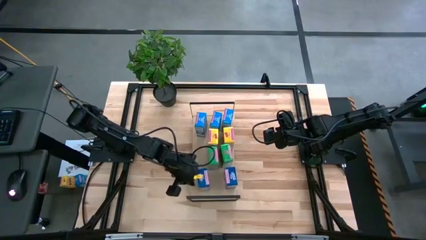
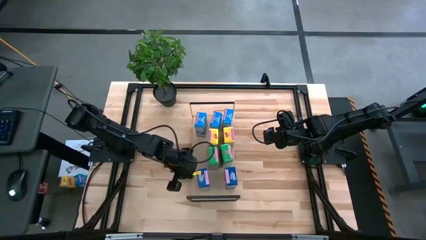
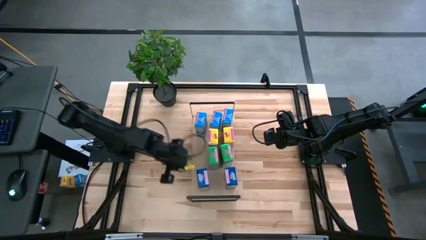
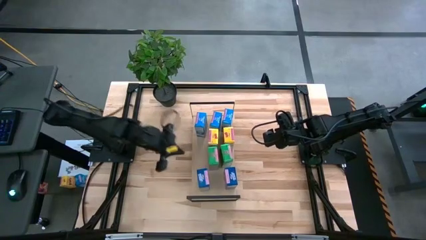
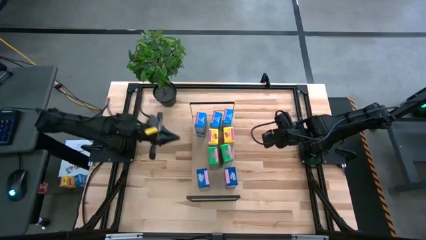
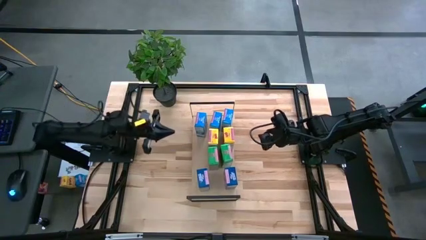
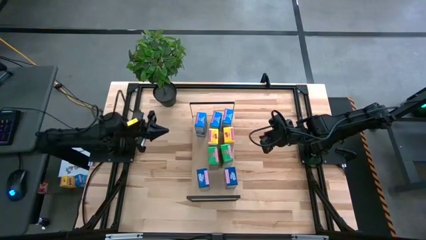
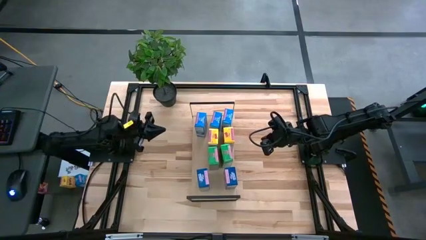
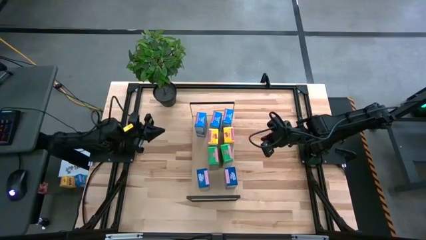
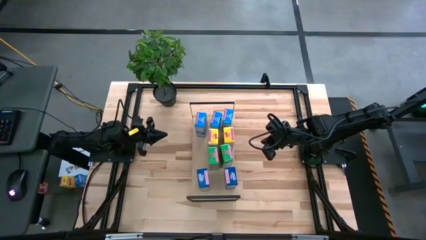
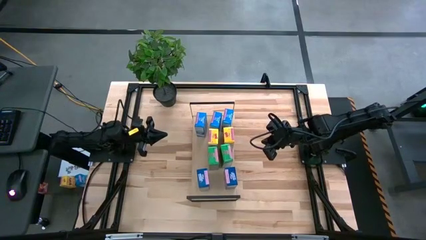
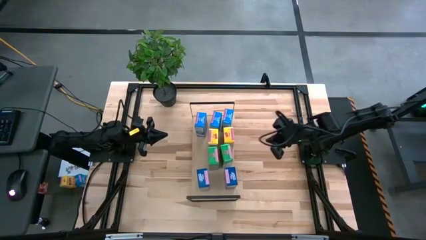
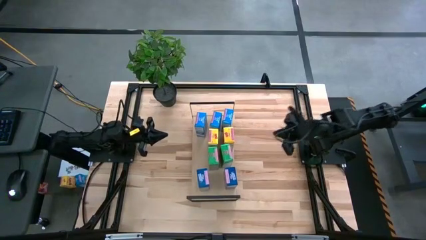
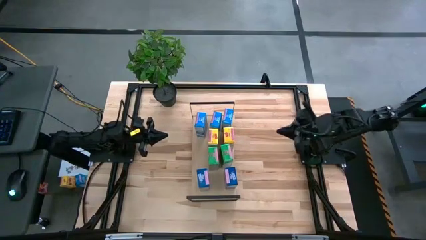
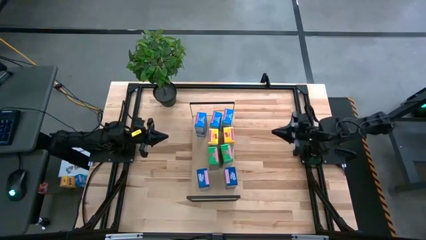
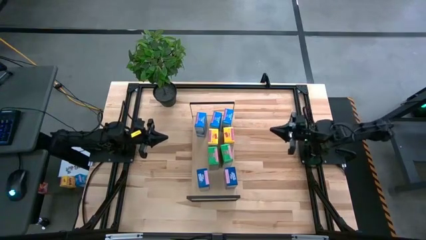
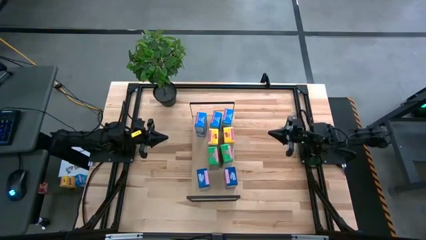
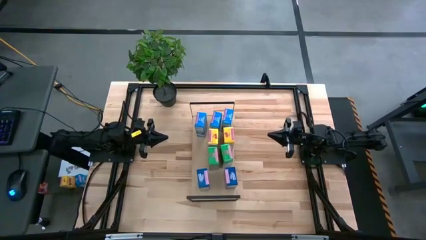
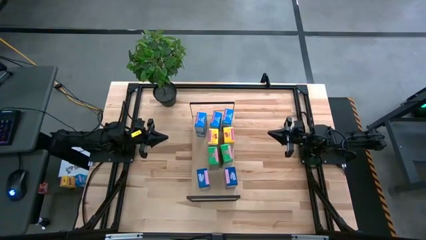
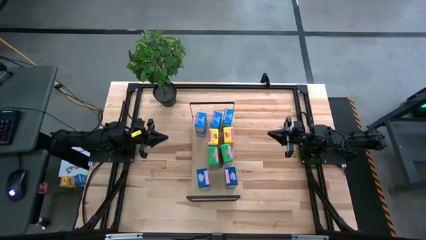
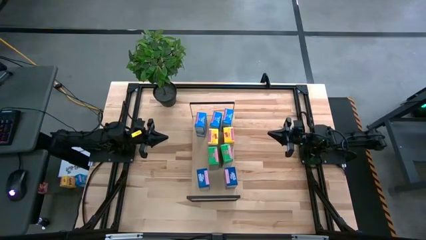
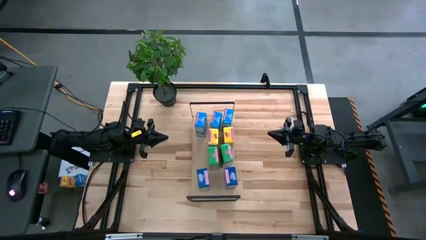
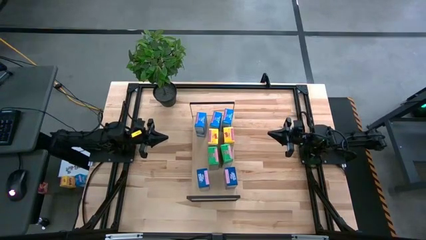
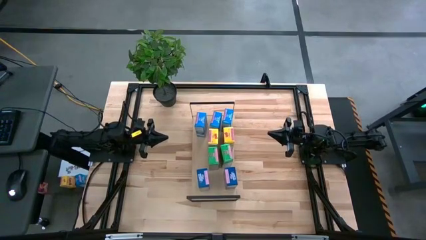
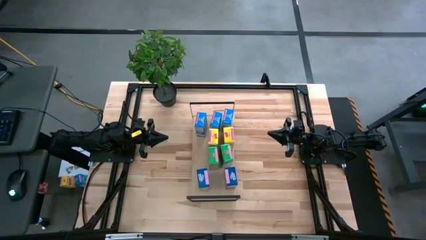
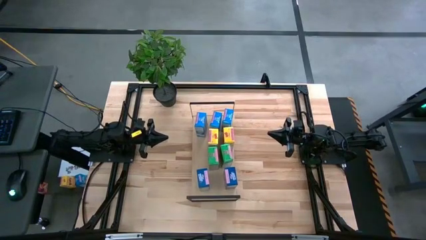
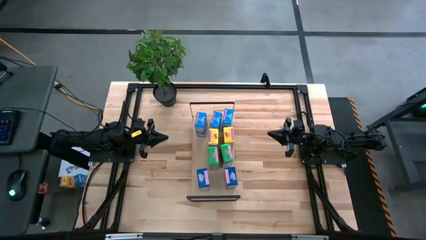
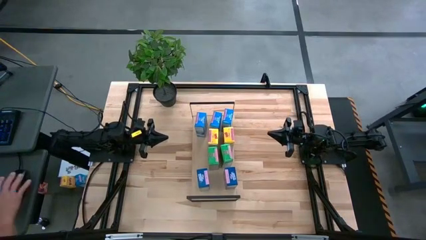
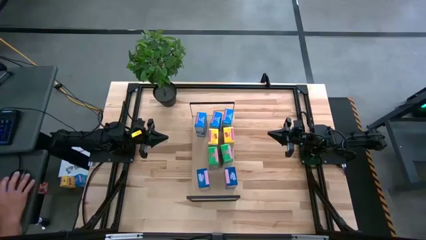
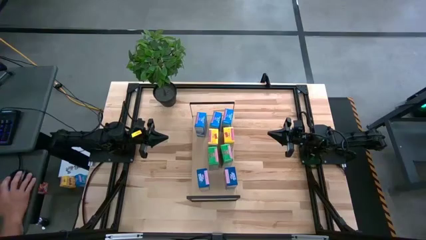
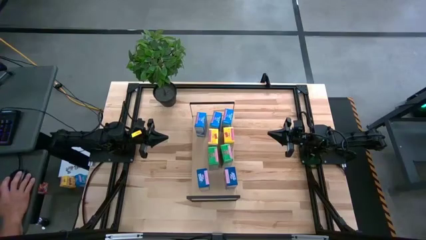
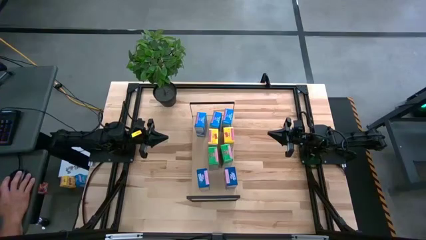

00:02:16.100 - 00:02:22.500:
Task: Stack cereal on shelf
Return to Home Position

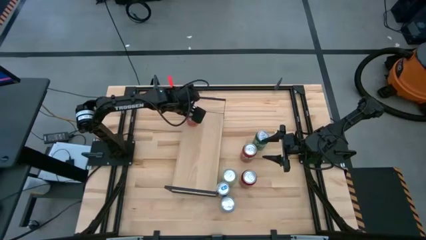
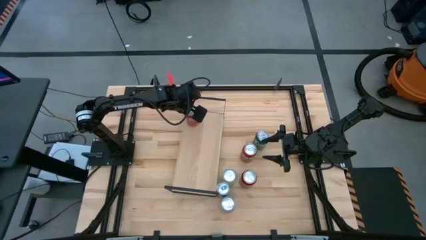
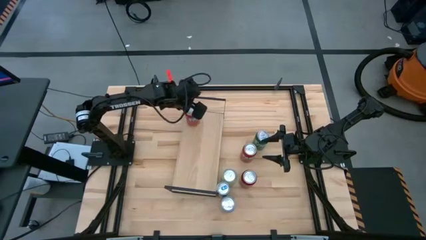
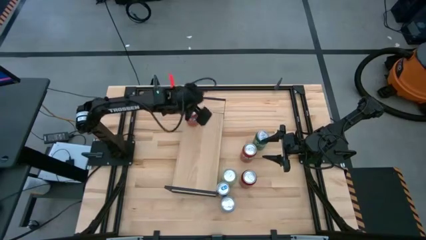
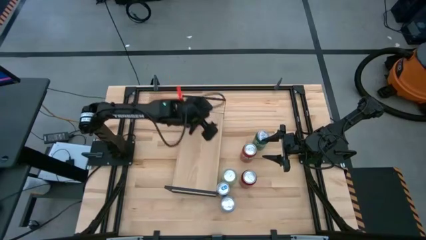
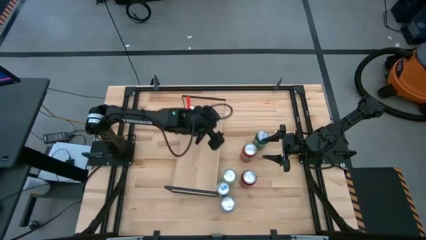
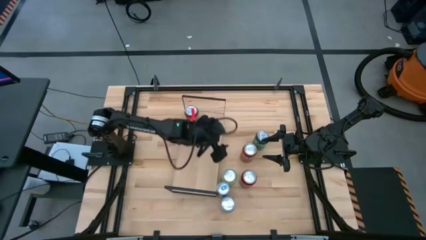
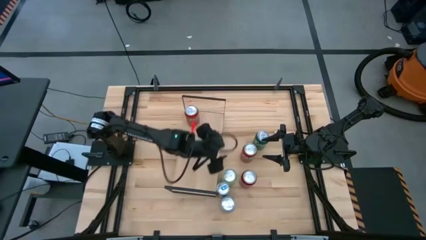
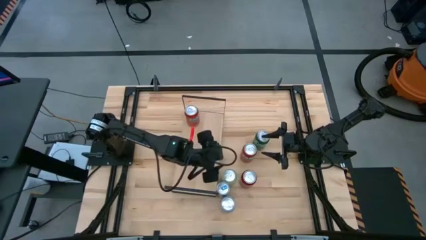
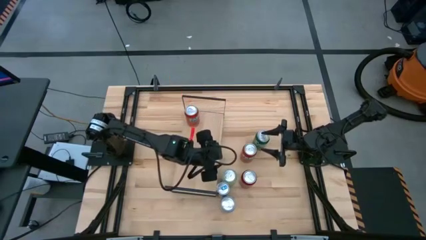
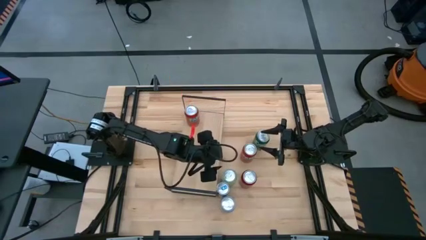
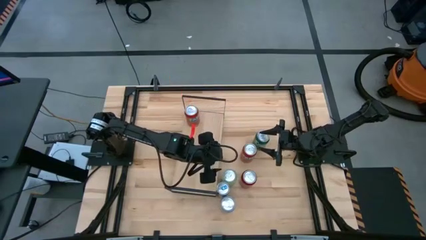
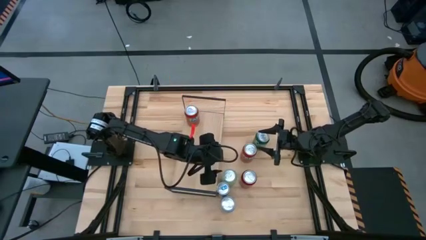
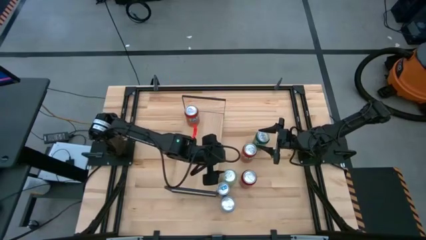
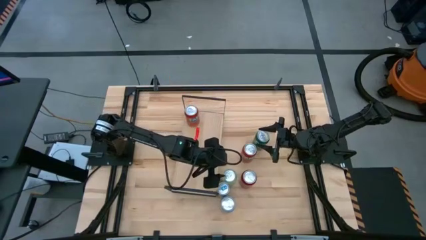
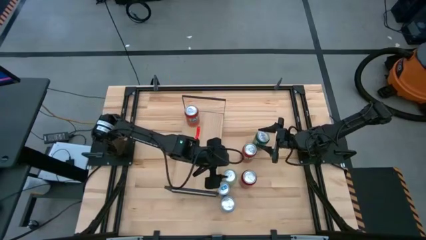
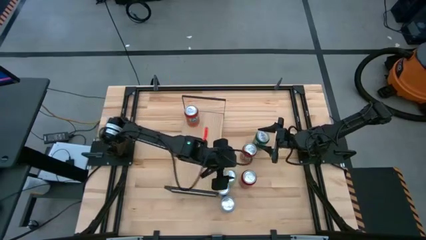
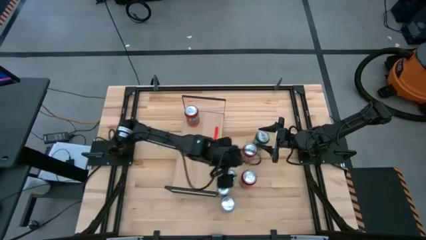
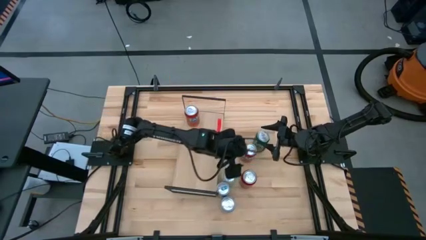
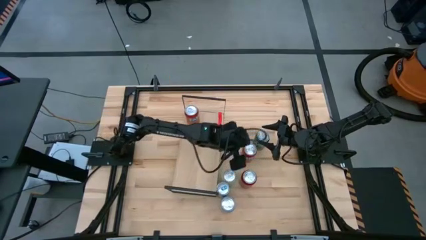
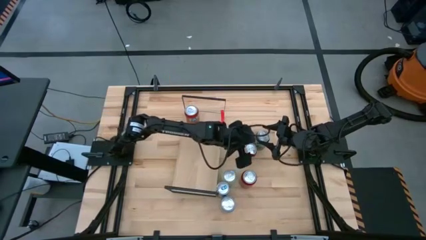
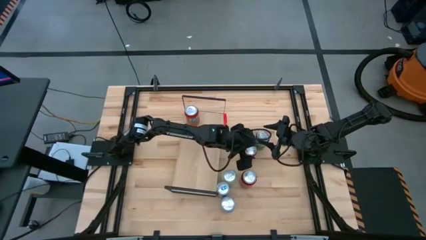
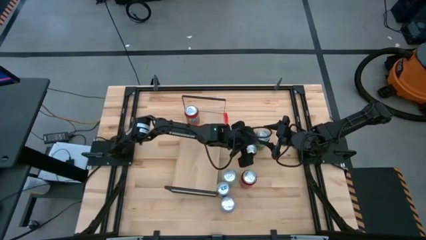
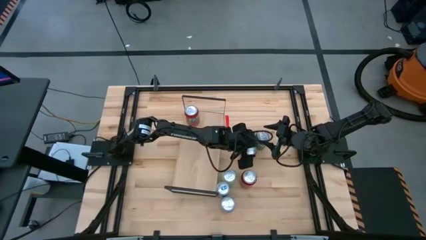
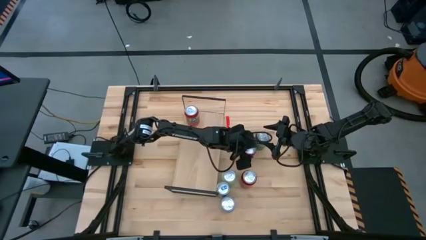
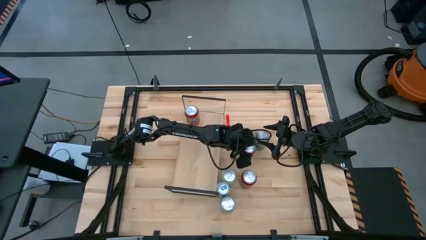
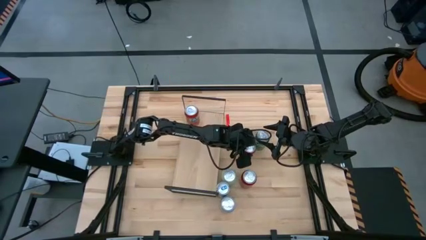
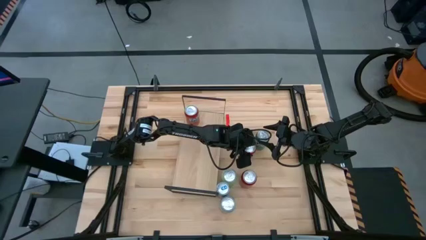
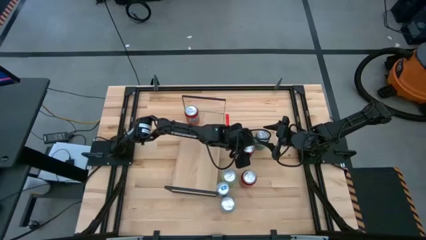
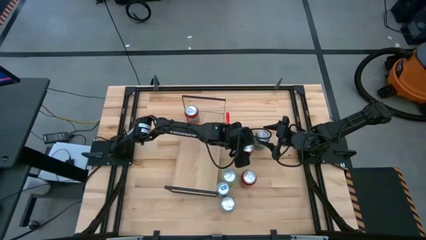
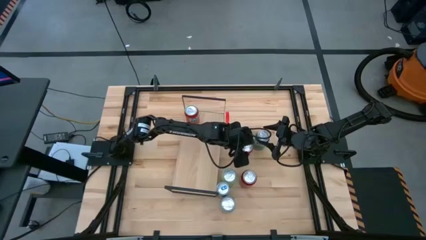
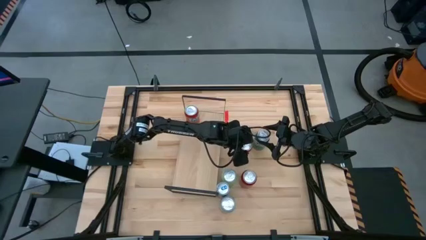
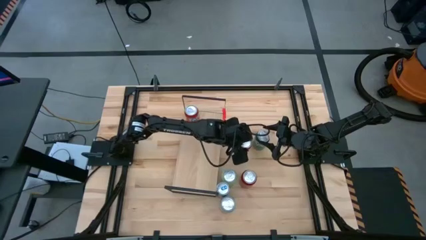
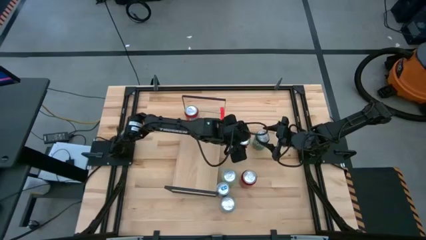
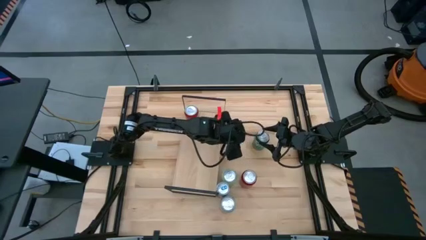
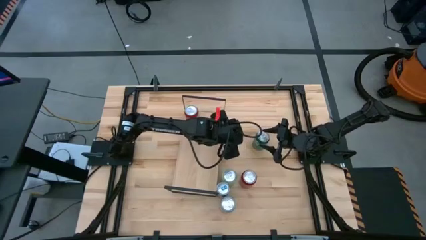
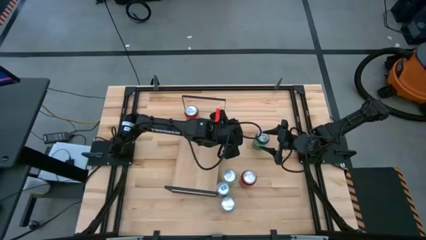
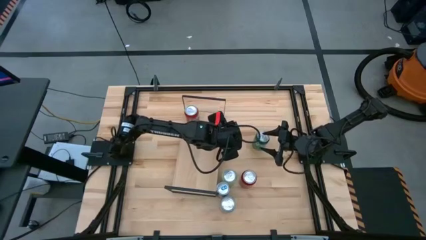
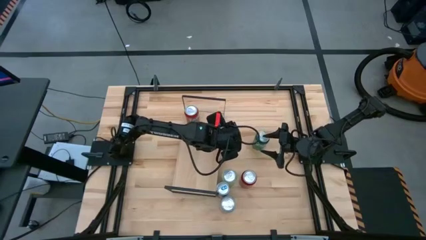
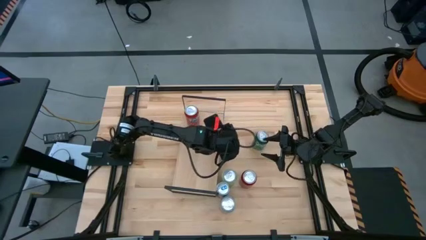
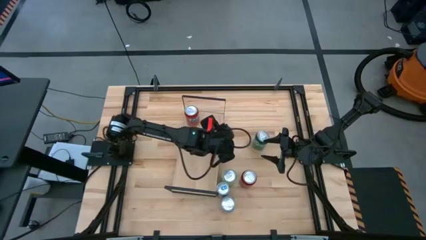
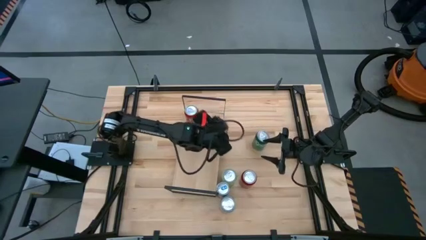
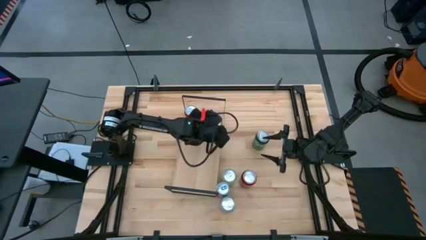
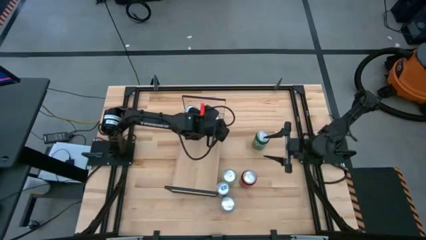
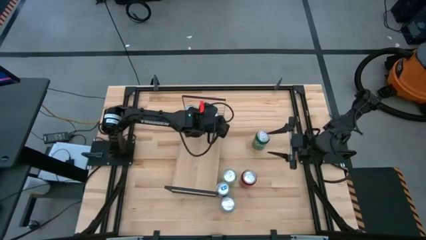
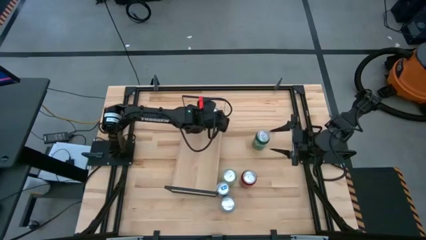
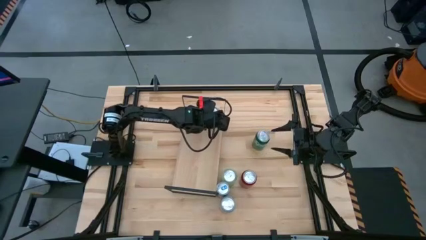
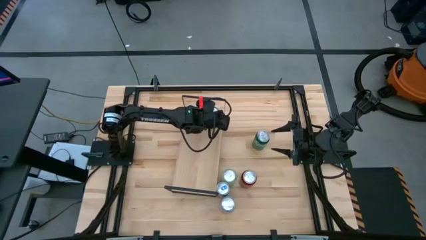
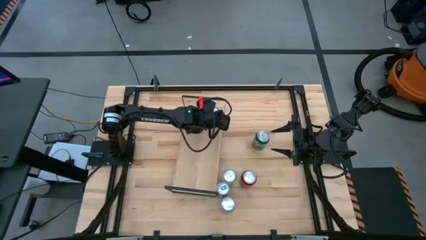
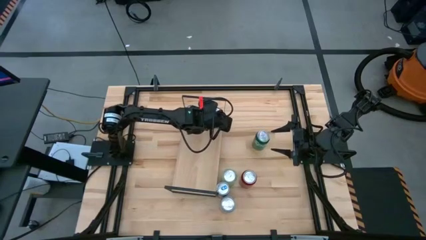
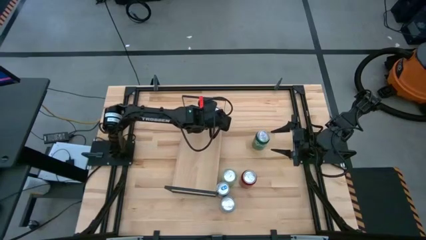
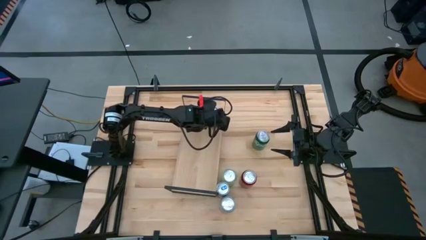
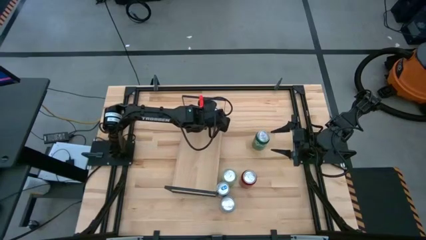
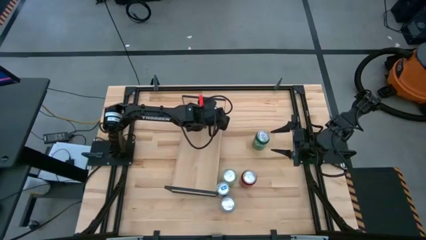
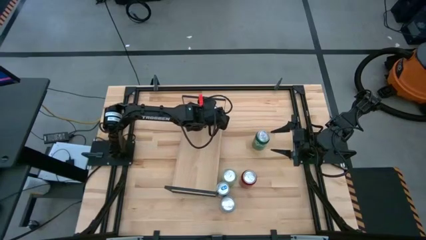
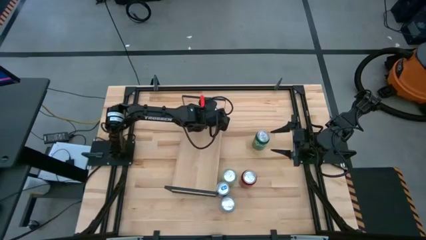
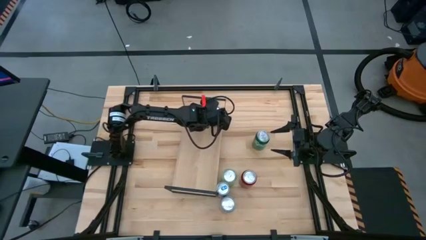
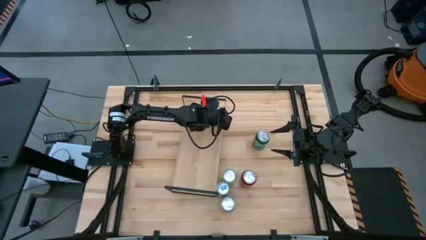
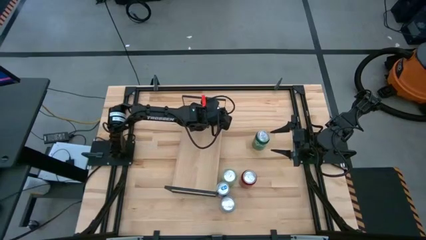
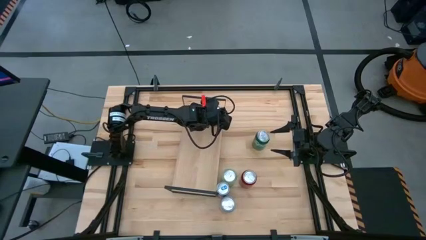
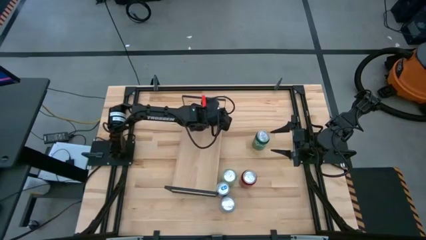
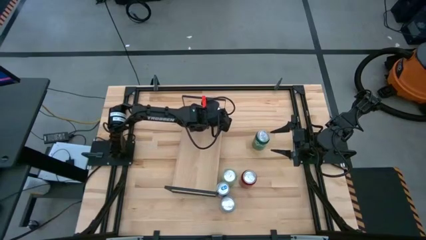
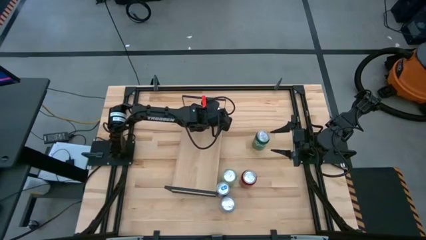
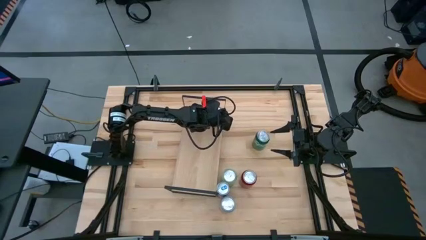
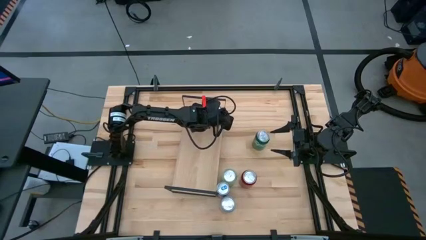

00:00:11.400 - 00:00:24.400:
Task: Place canned beverage on shelf
Put the red soda can on the shelf
